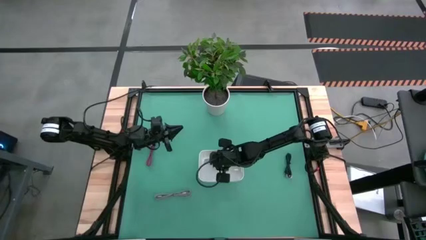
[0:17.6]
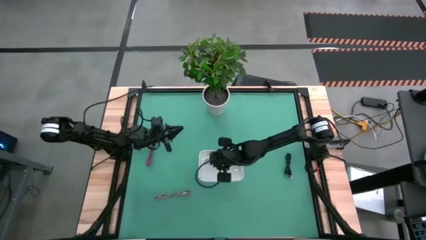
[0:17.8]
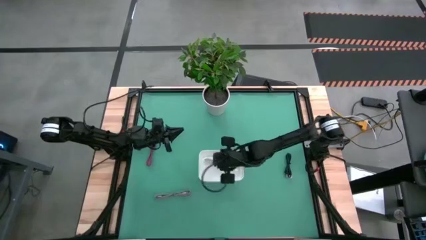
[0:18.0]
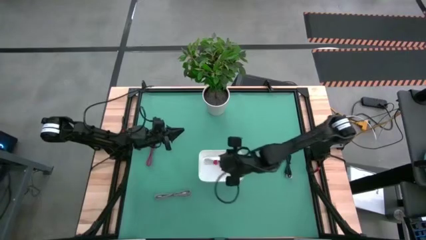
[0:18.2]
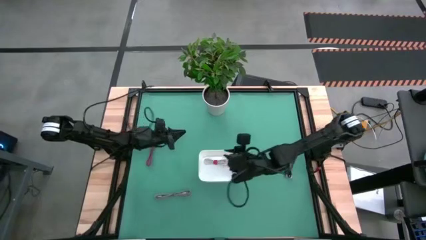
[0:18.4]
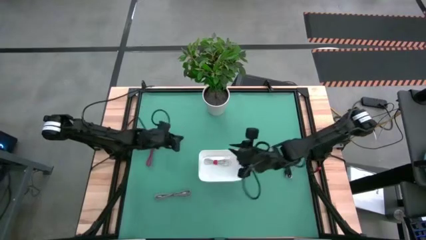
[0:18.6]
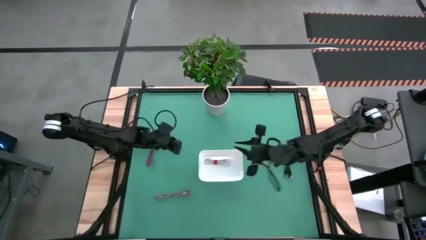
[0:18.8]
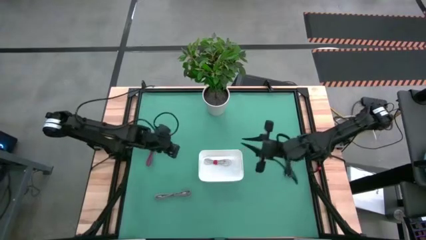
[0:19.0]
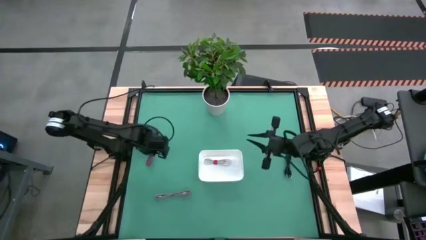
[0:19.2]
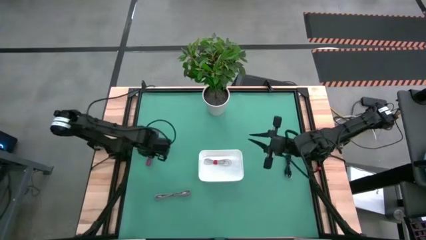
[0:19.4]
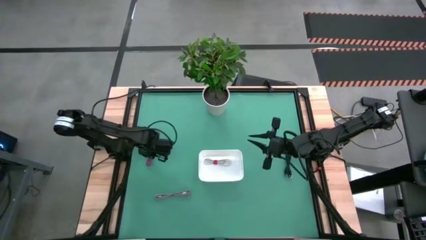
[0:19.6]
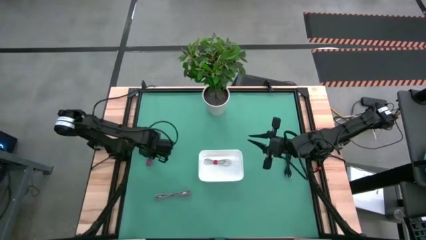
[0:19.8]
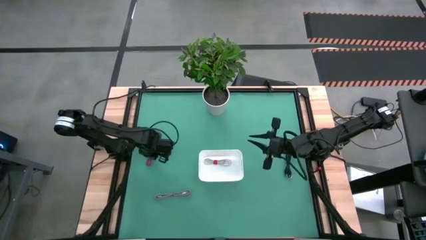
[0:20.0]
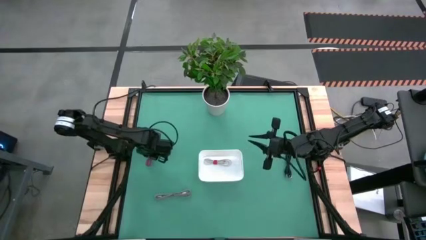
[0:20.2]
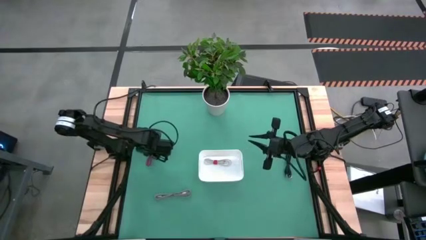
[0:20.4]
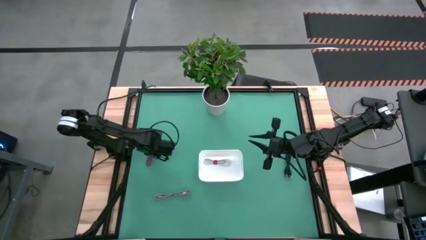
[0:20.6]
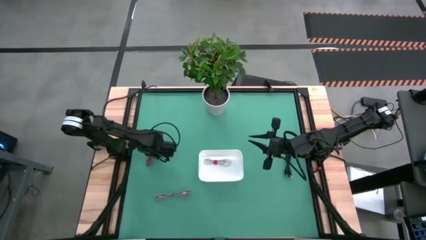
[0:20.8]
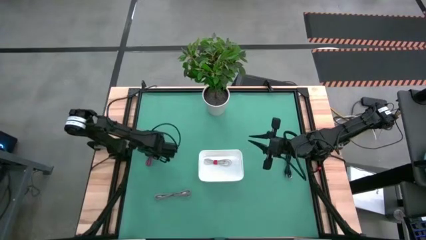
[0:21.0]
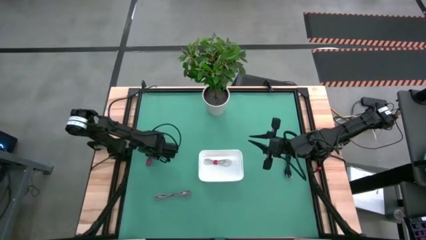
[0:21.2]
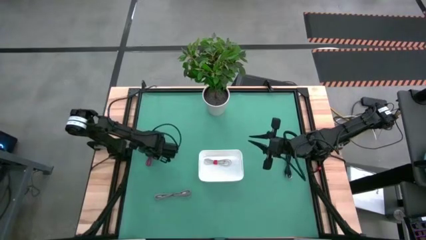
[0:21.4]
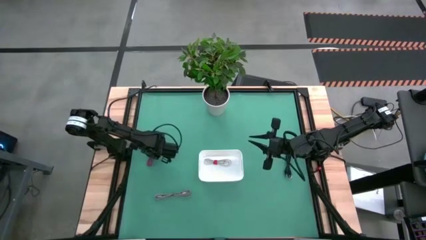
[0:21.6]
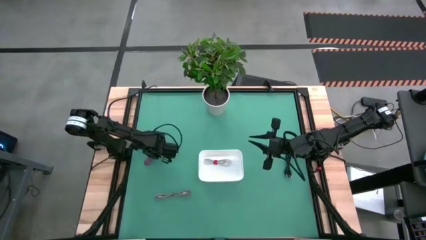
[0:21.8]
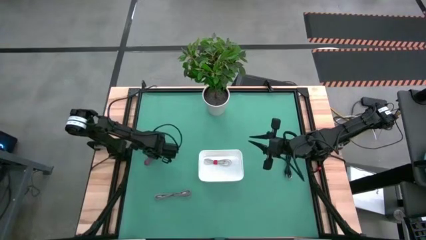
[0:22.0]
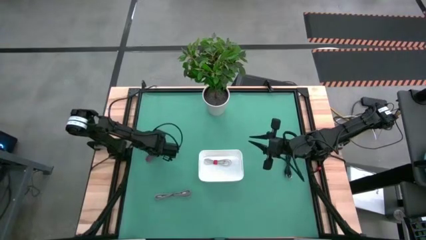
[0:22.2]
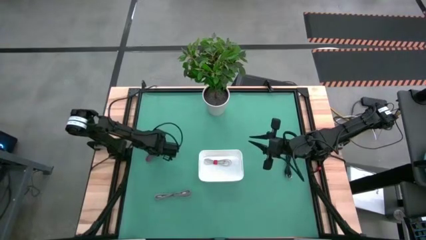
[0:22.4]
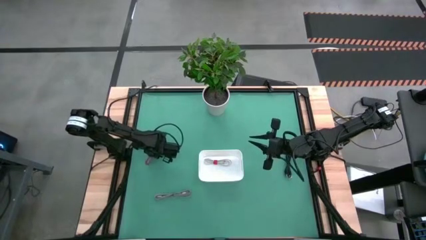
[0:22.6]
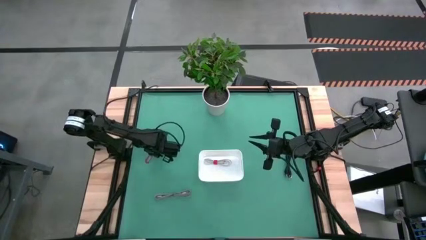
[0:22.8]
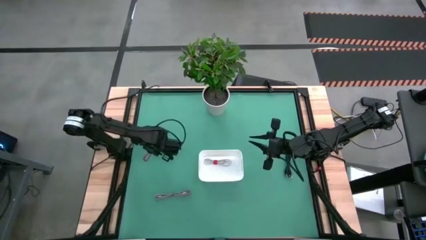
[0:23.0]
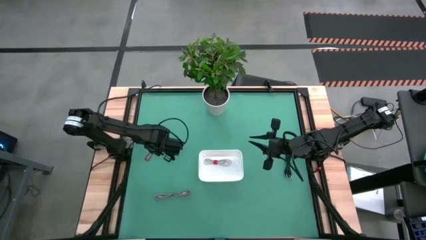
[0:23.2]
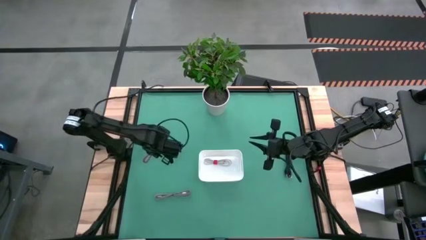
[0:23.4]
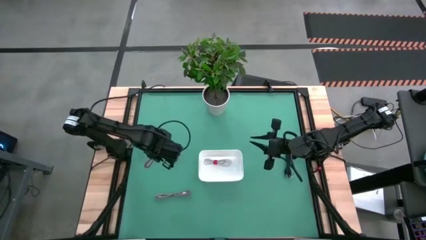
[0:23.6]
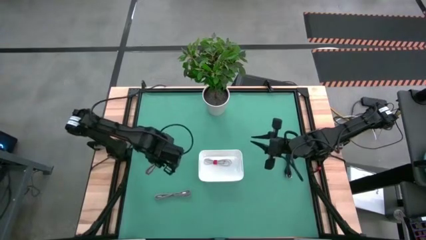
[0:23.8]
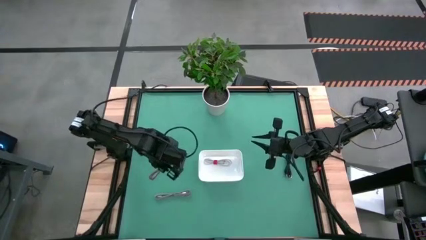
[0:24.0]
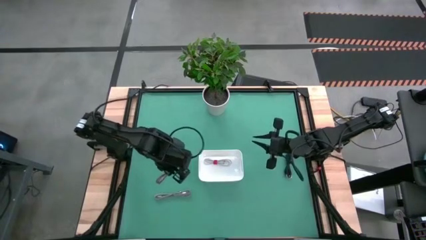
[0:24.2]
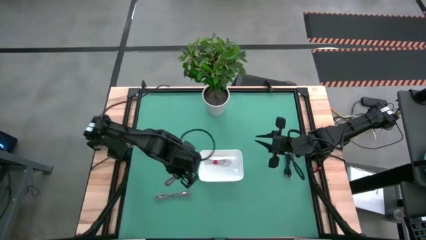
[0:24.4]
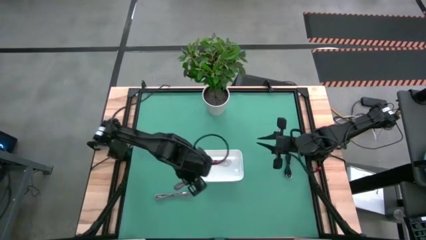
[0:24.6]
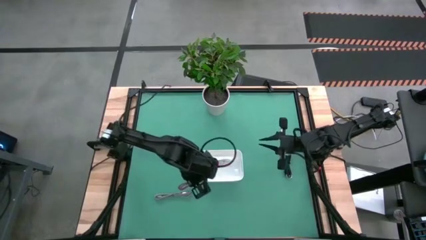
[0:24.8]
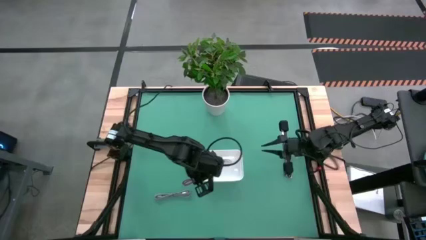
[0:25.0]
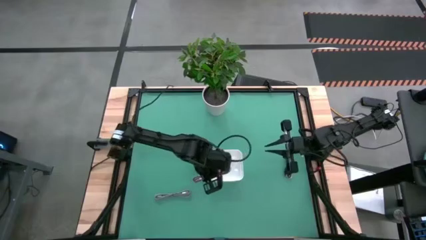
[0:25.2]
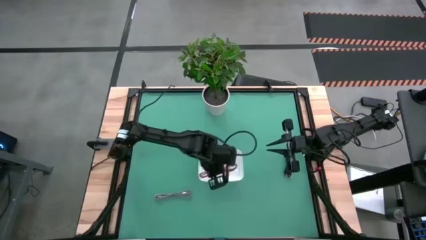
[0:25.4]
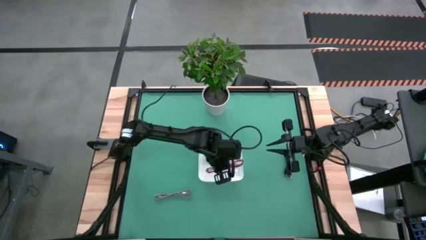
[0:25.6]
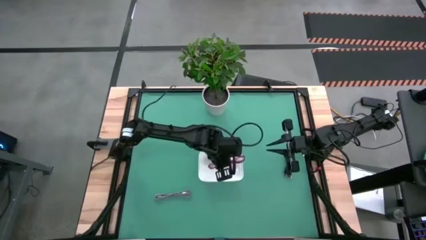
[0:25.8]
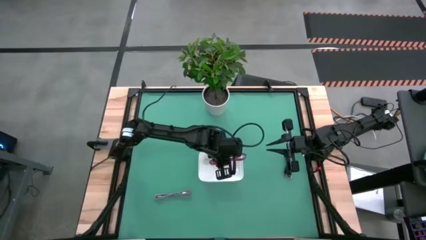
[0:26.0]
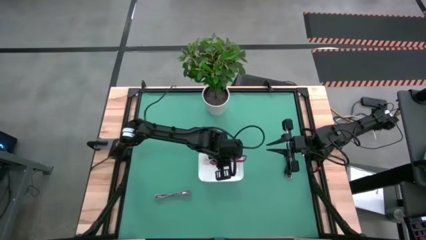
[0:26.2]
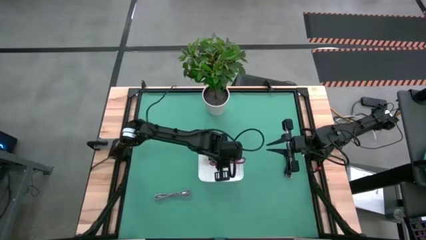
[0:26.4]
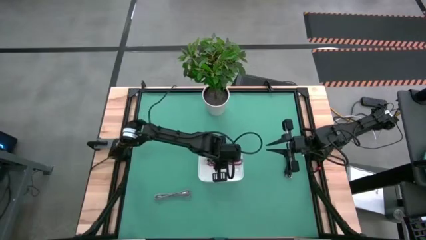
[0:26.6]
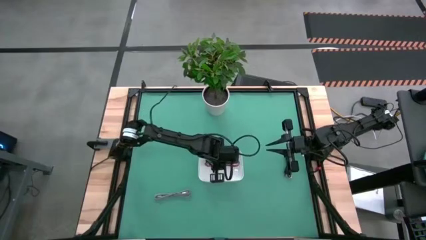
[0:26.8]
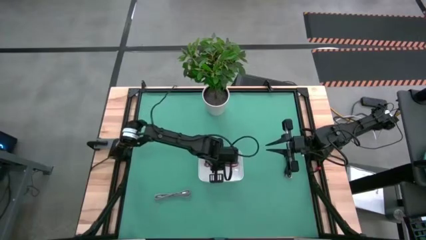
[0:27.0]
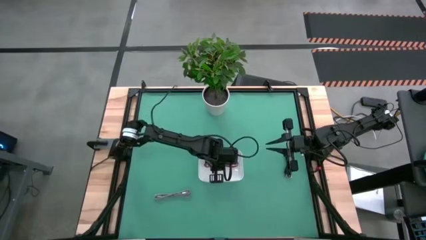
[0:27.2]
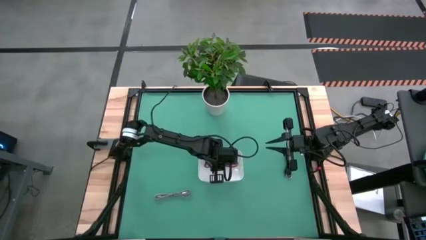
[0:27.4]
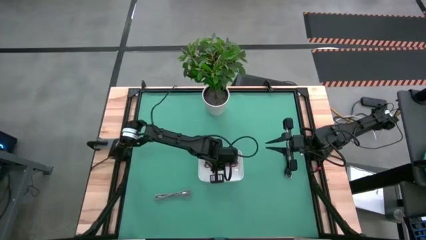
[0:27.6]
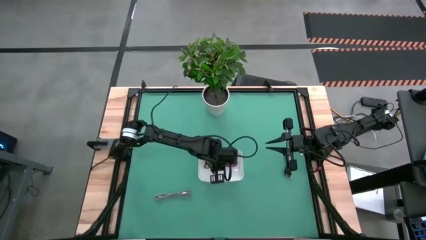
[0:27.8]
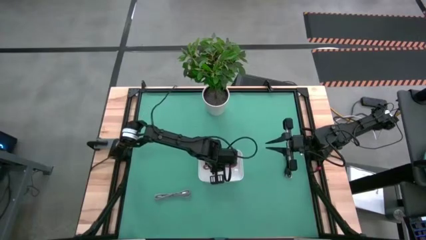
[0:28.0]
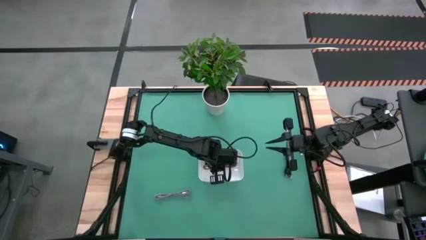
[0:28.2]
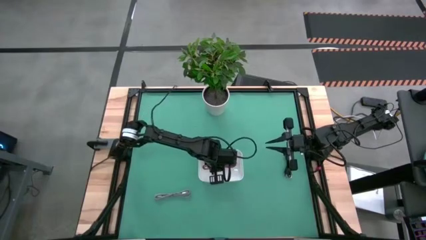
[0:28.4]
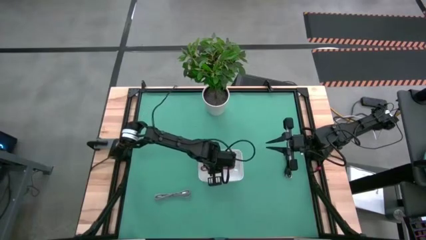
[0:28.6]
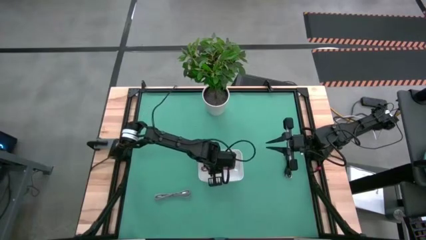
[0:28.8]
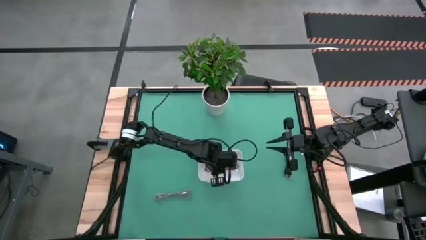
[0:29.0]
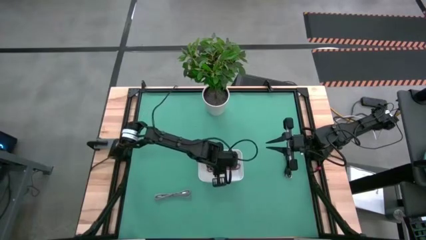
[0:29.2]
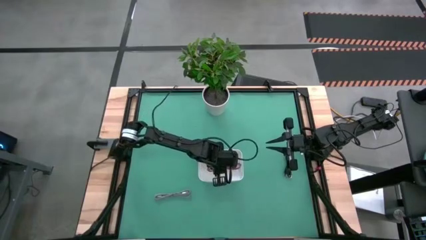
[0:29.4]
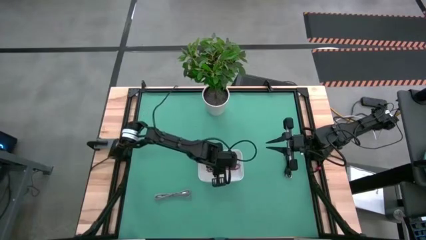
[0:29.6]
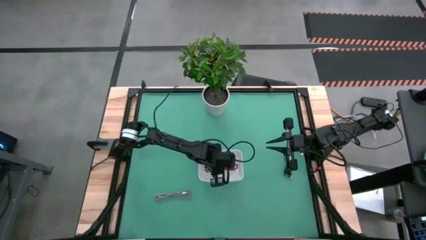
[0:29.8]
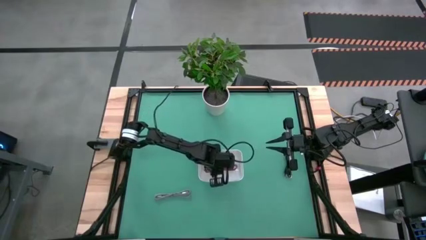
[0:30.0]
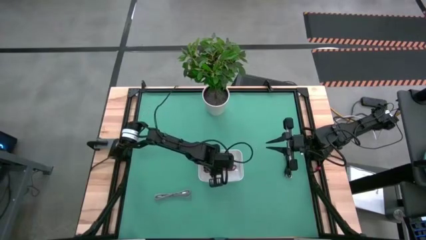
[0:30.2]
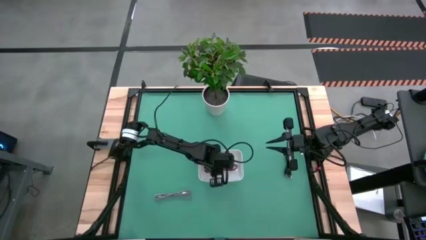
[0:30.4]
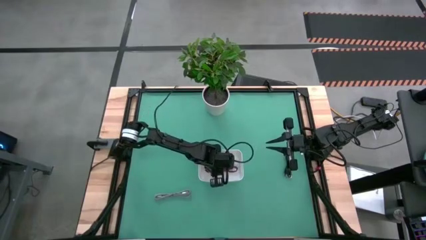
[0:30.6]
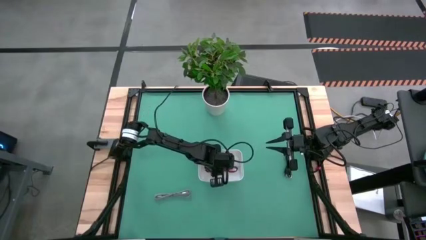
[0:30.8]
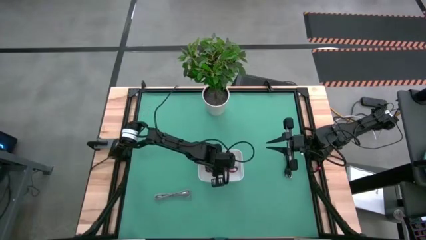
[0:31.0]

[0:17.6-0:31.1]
Task: Pick and place USB-C Cables
Put the red charger cable into the white bin

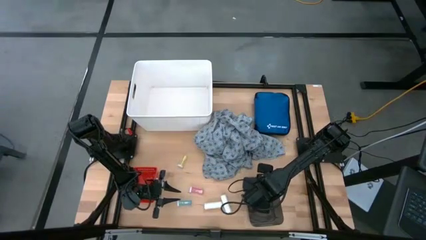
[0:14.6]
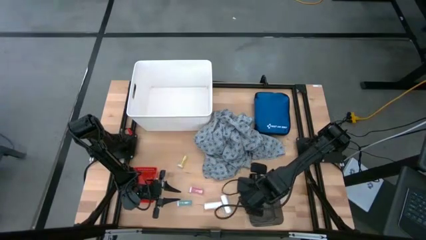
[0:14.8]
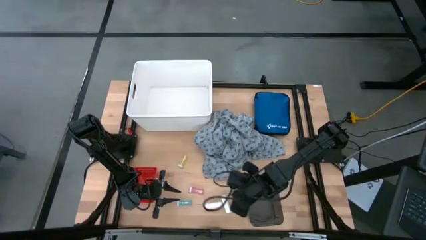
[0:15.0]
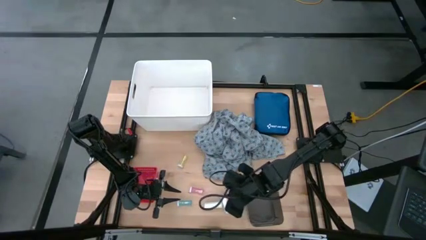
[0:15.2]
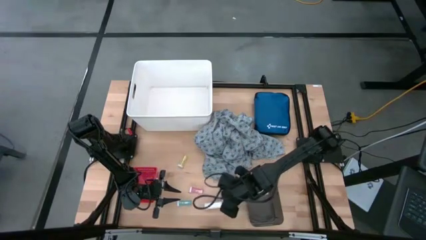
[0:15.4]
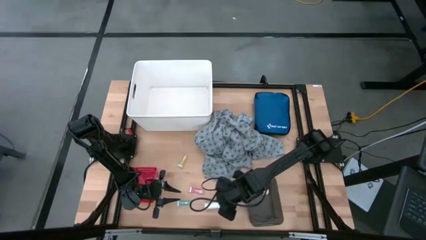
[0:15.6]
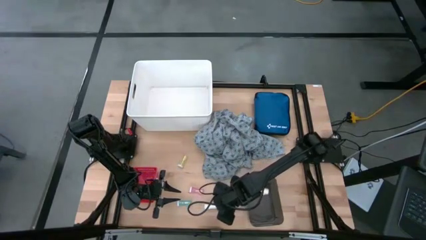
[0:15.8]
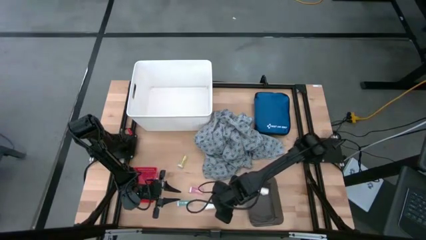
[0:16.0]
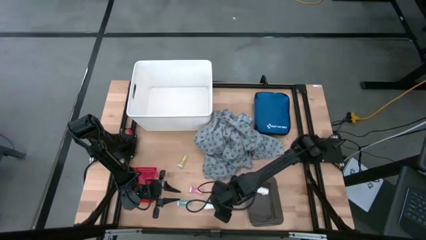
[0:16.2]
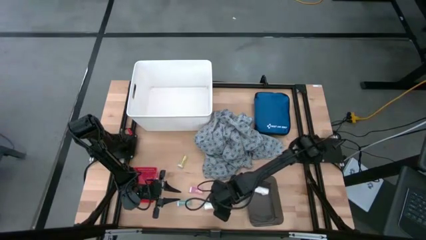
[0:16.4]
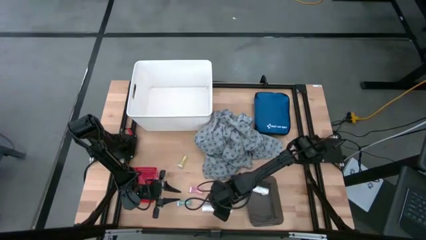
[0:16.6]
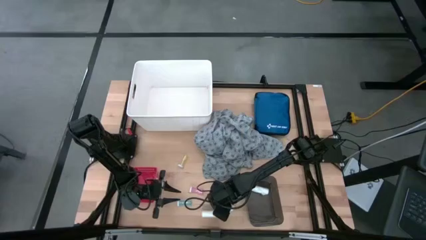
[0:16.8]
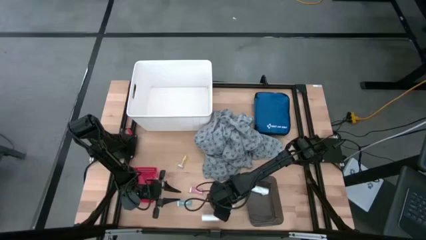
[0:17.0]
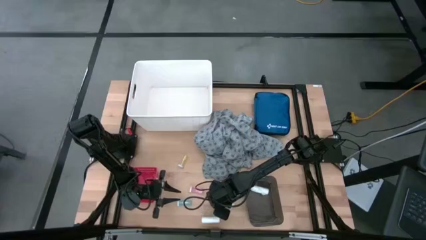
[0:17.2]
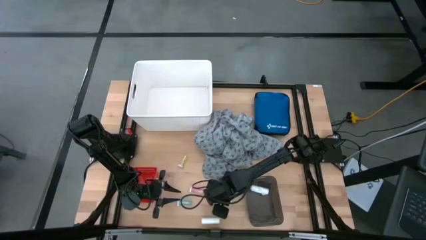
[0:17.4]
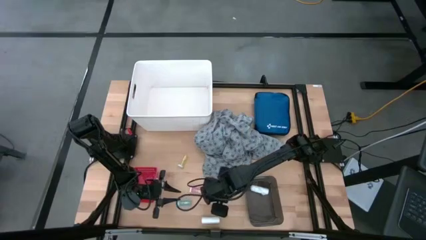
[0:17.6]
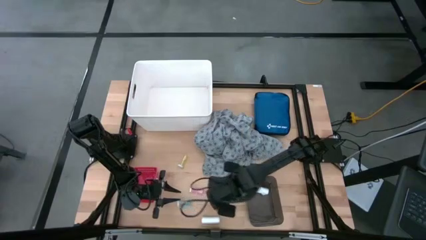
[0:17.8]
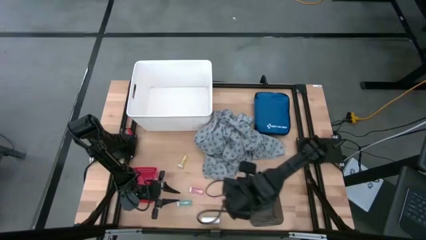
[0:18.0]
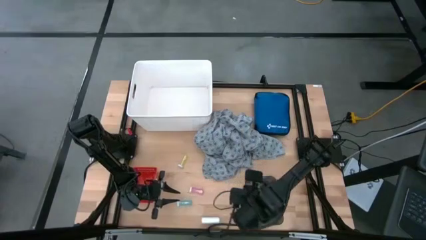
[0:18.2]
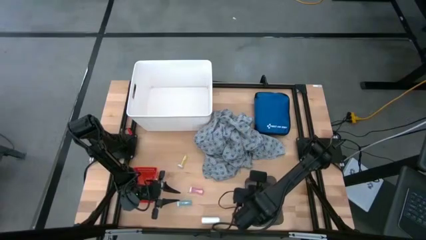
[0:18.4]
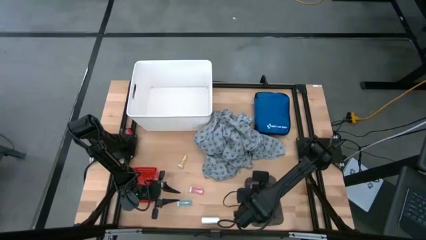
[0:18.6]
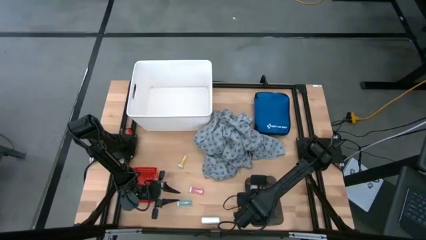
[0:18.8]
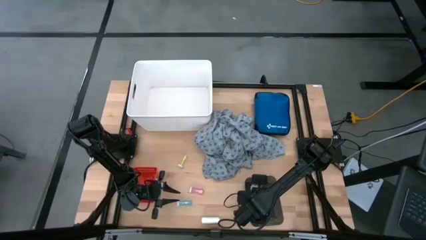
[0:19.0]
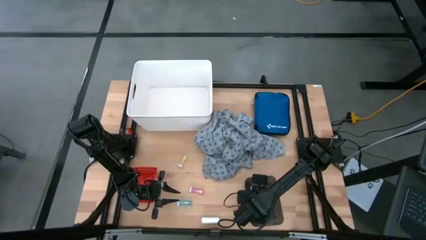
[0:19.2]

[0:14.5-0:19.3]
Task: Pick & Place Medicine items
Put the right white rolled gauze into the black bin
